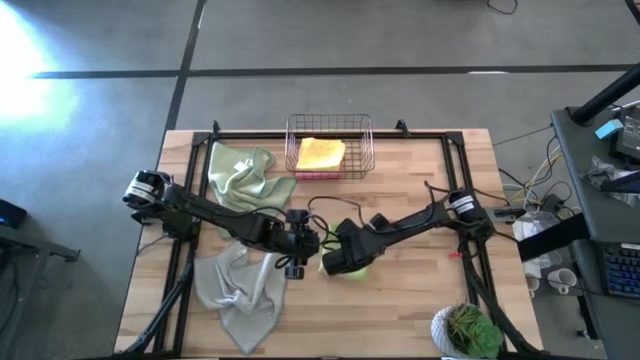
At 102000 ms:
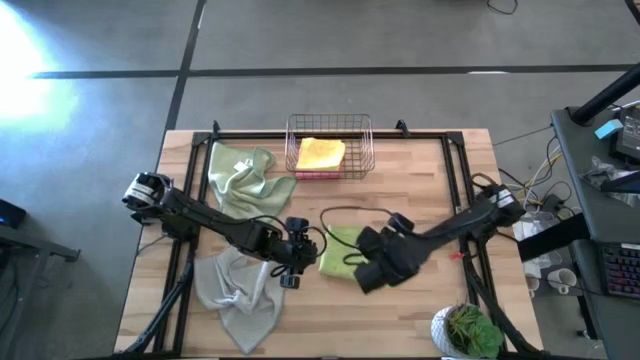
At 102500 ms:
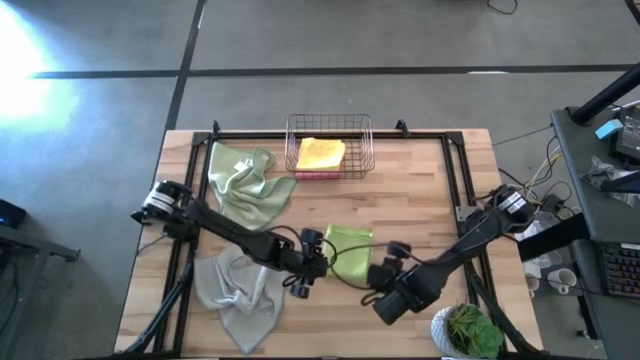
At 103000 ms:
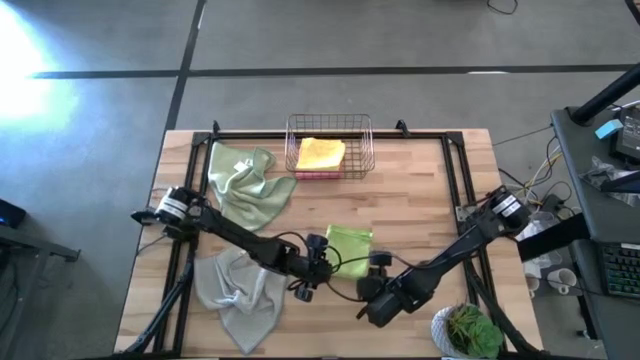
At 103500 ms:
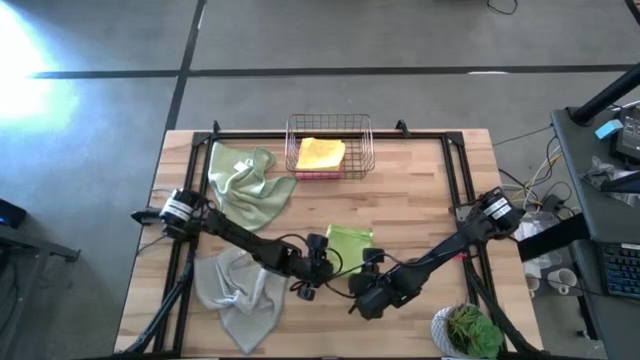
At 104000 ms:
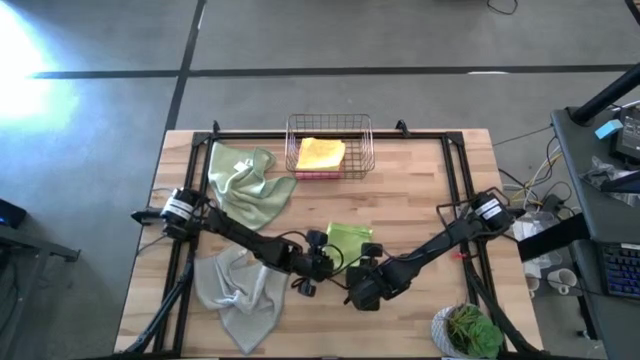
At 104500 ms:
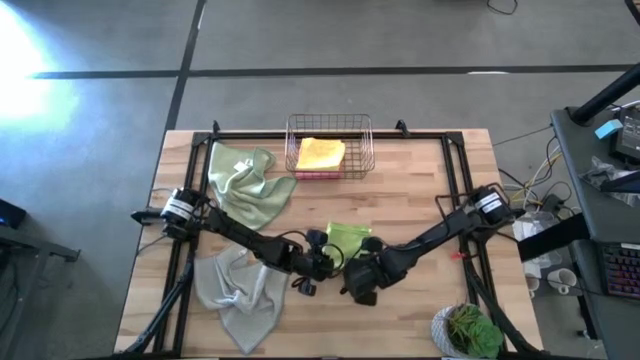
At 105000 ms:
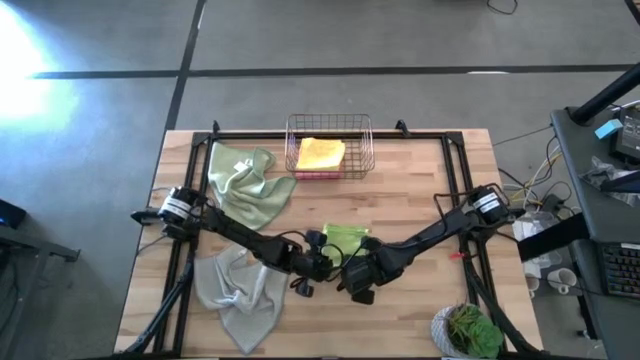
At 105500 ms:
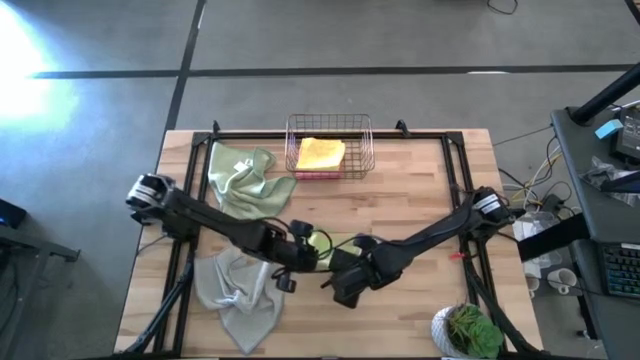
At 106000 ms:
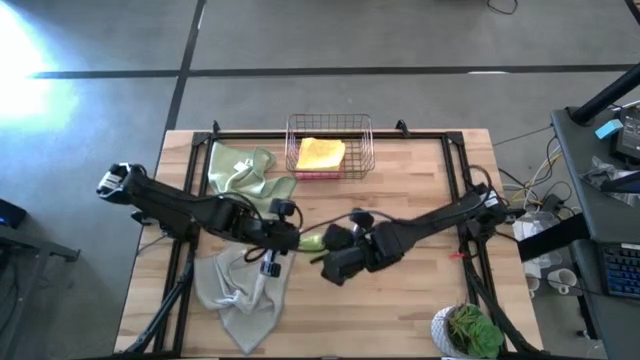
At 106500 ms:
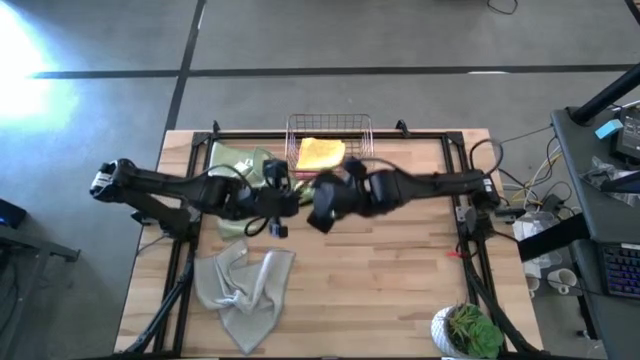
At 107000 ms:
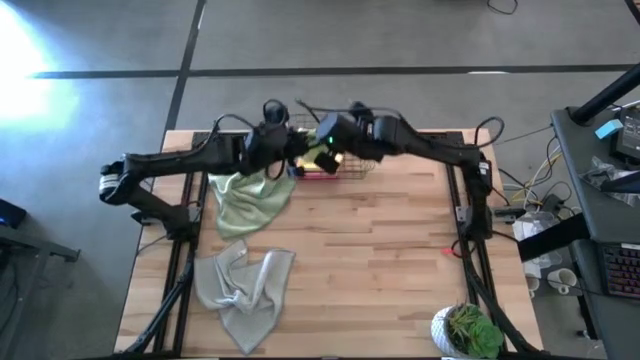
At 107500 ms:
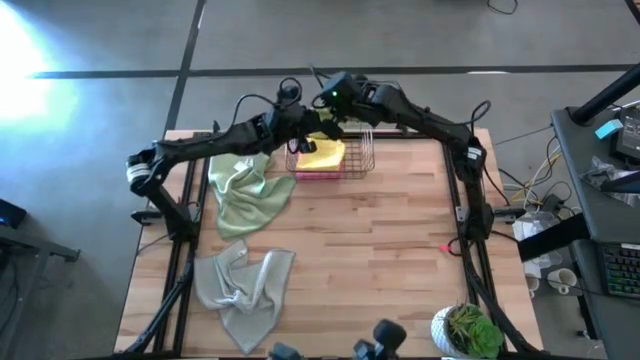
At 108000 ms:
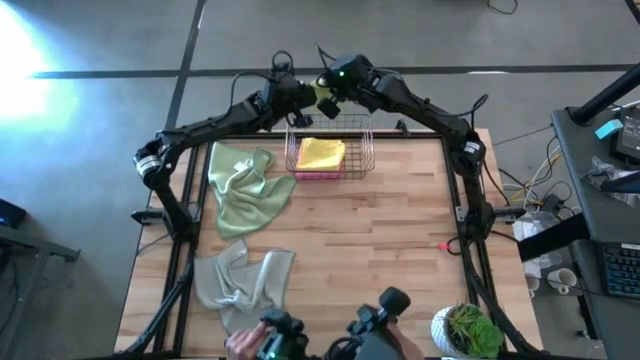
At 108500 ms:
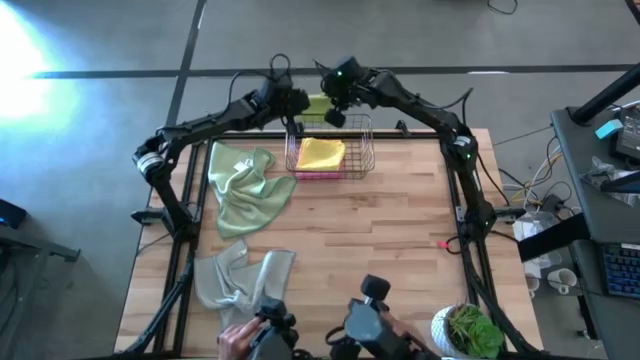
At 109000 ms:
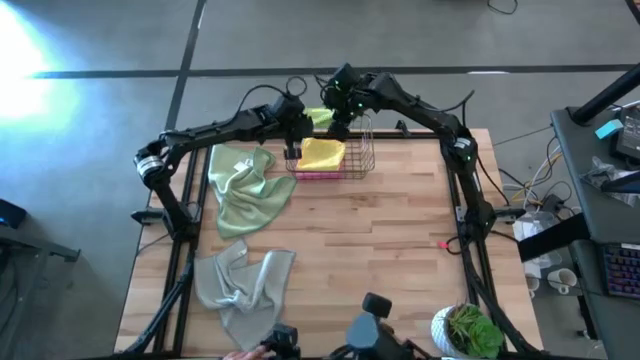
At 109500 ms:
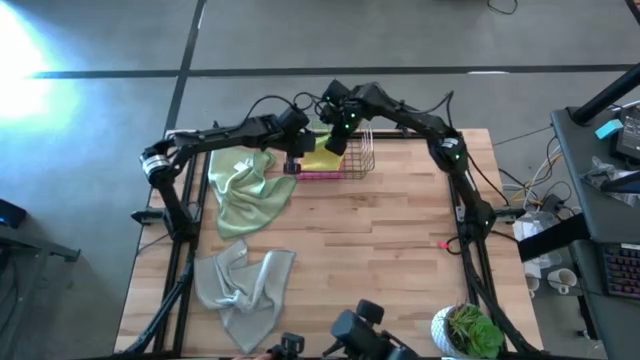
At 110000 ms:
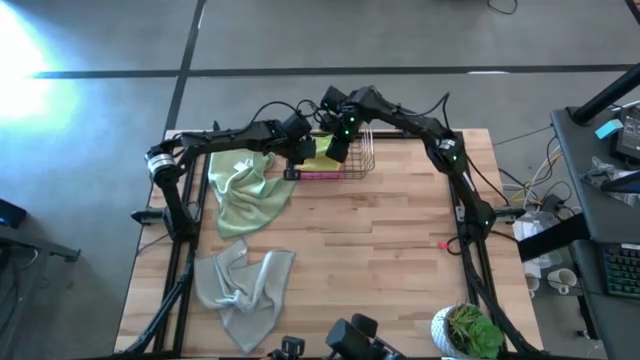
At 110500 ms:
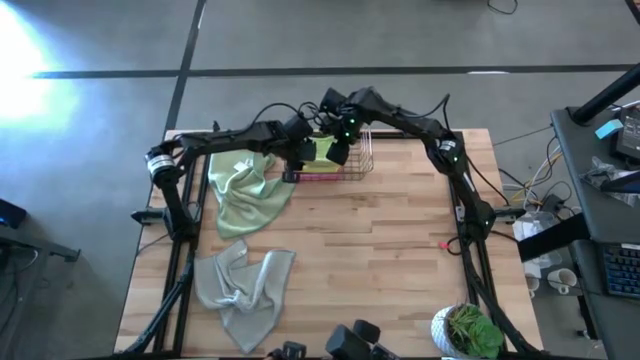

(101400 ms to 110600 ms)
Task: Fold microfiber towels
Stack the folded green microfiber cloth on top of the yellow microfiber cloth in the wire basket

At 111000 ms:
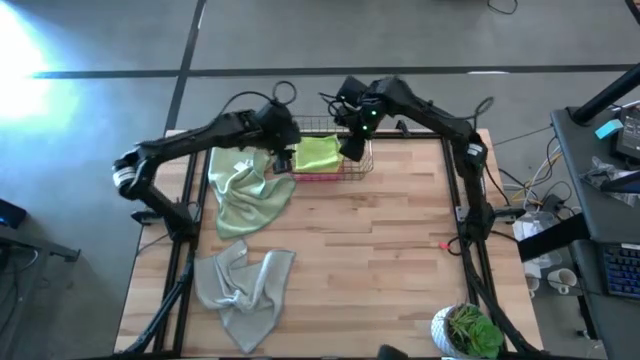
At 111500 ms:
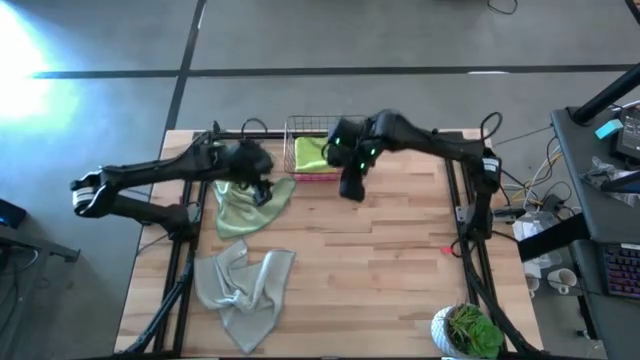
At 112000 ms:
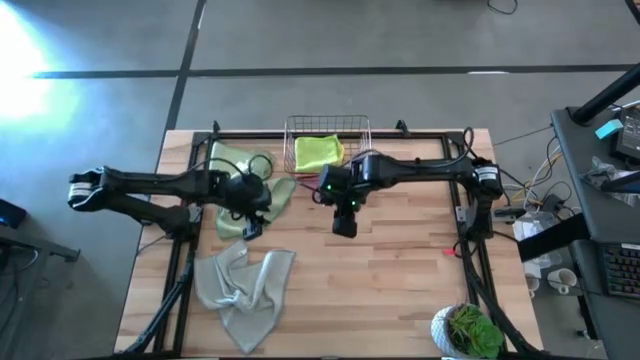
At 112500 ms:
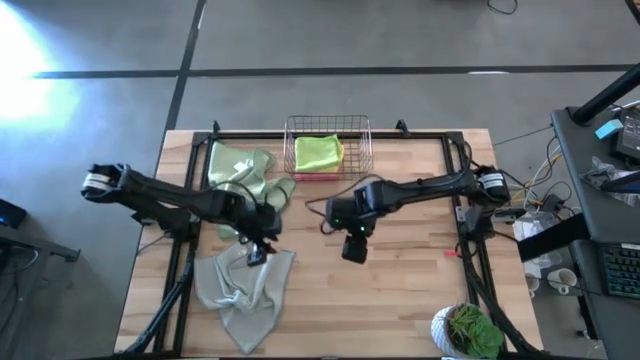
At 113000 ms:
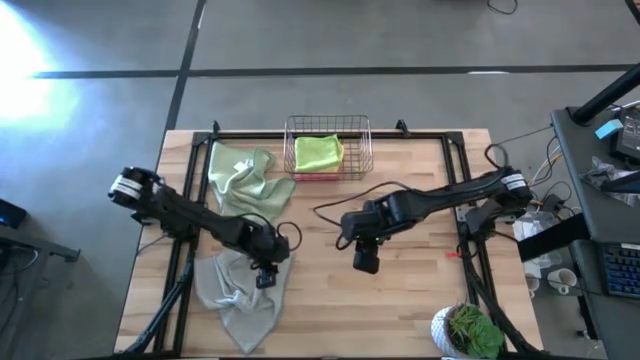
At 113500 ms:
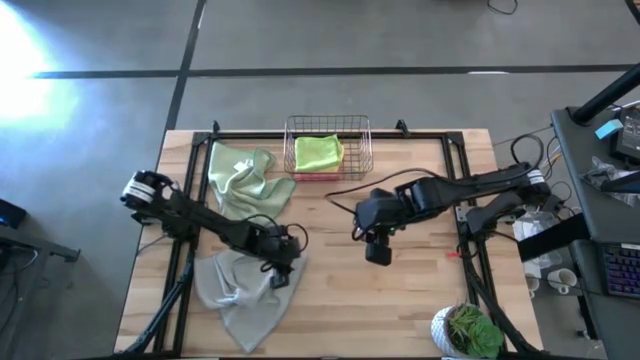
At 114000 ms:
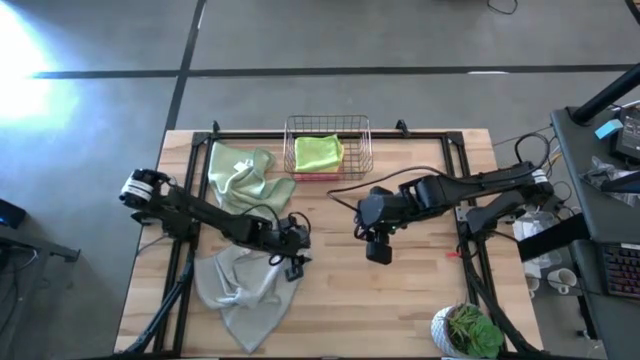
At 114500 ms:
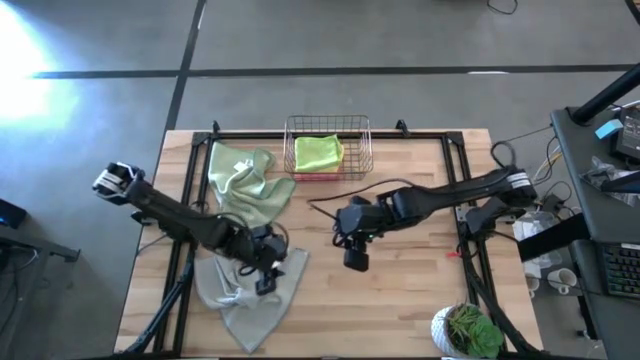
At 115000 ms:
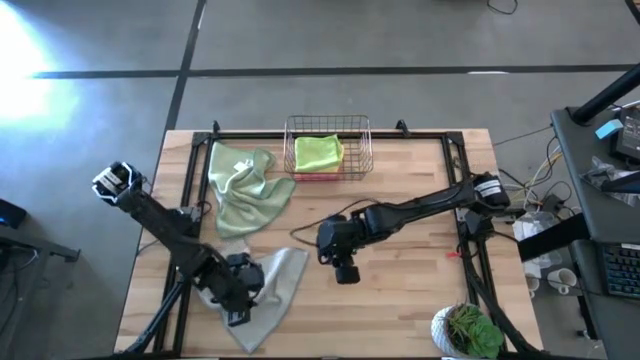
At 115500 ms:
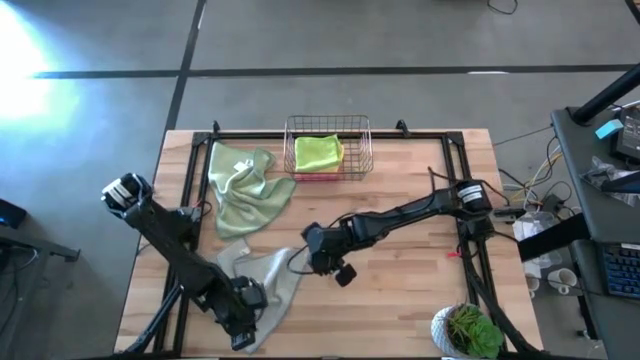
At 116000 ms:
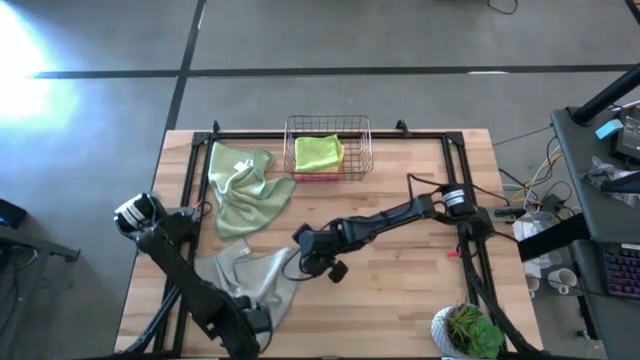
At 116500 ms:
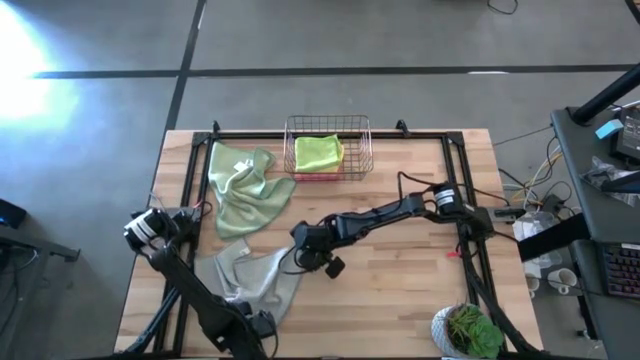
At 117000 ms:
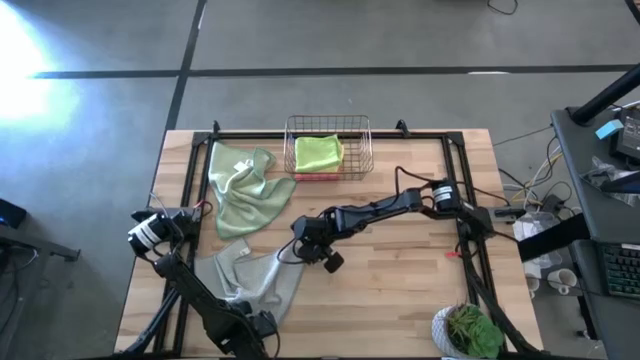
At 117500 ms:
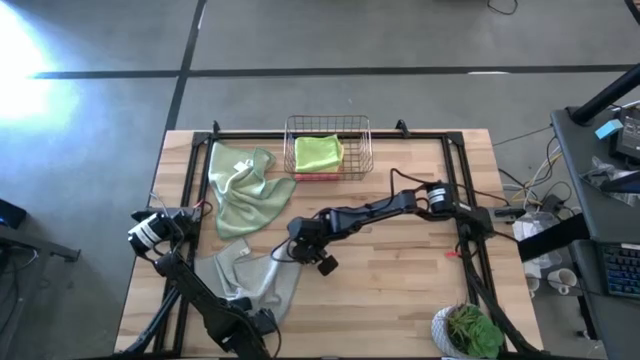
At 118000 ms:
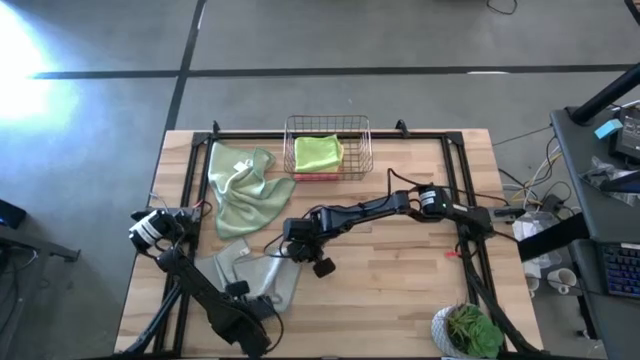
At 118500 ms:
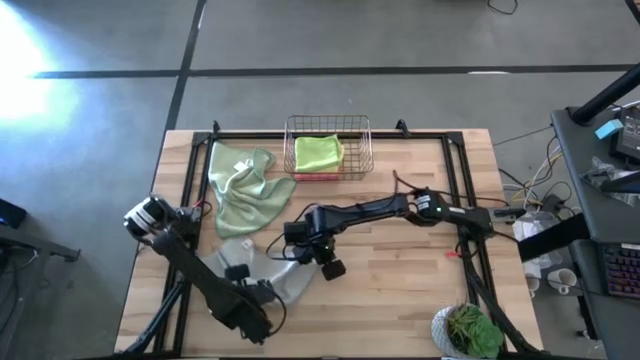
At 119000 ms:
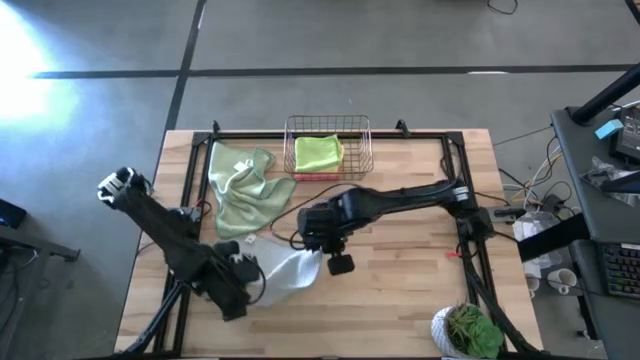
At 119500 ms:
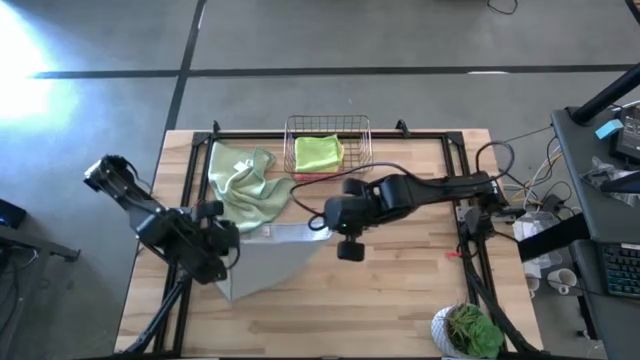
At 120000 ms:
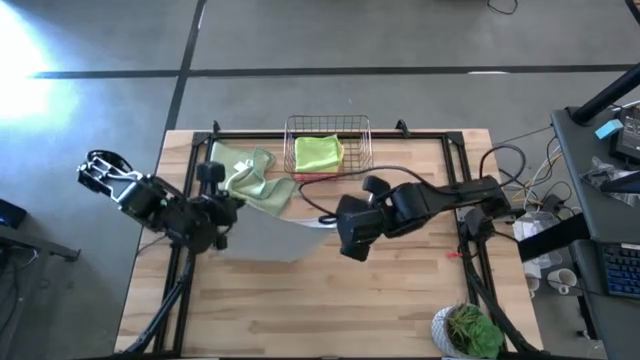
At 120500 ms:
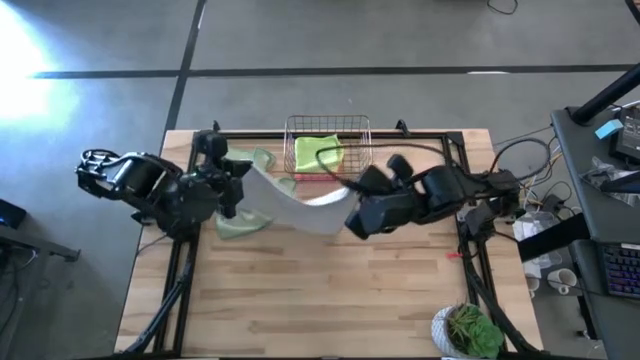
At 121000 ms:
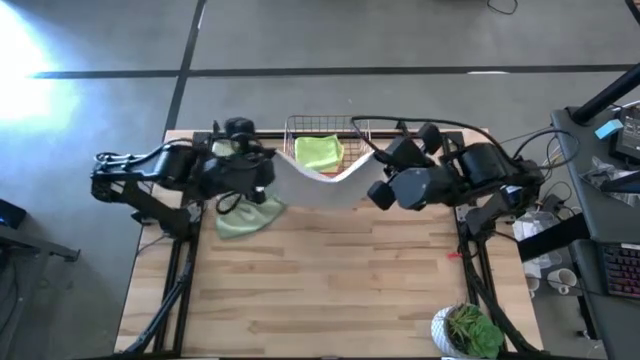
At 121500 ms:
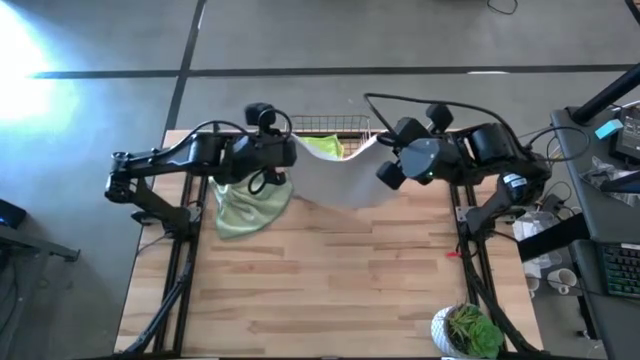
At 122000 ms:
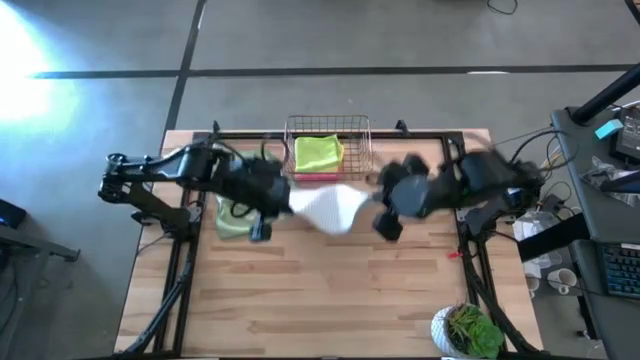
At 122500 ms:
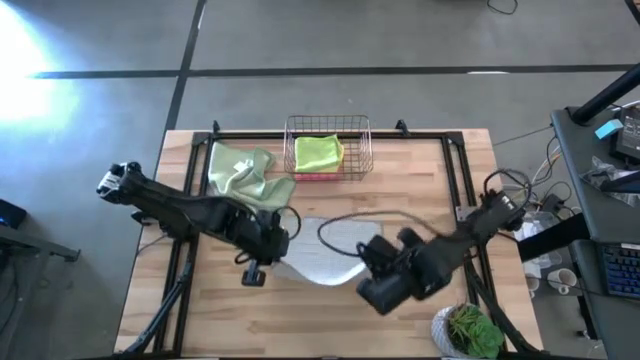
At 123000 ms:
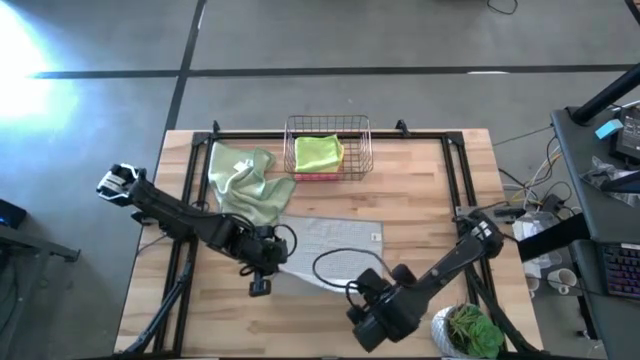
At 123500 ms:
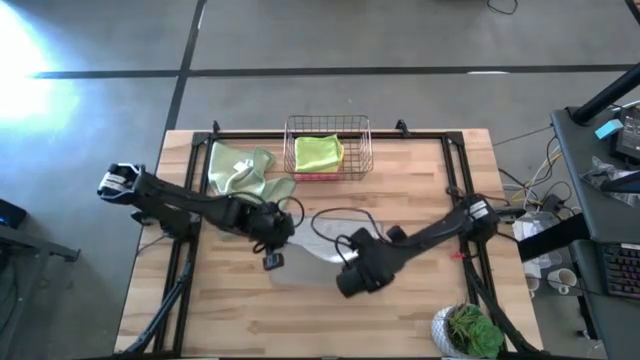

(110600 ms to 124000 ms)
Fold the gray microfiber cloth
